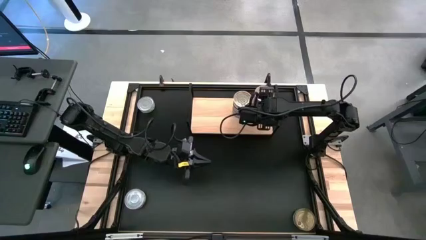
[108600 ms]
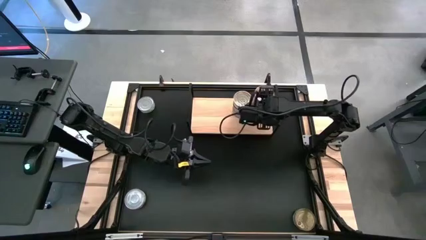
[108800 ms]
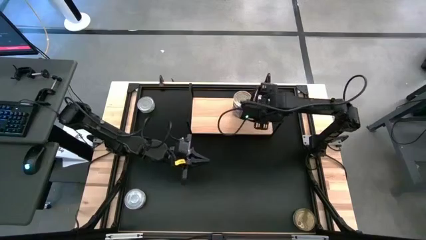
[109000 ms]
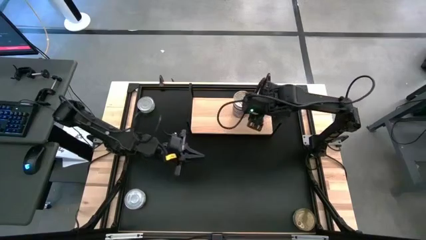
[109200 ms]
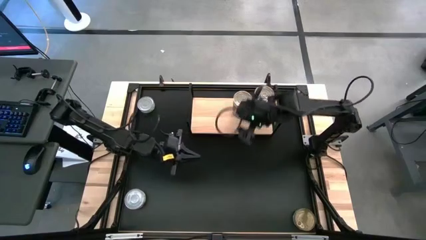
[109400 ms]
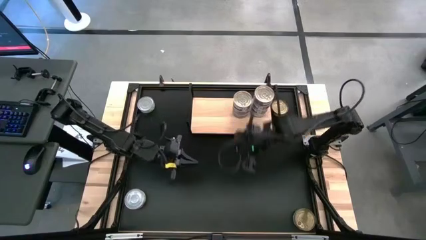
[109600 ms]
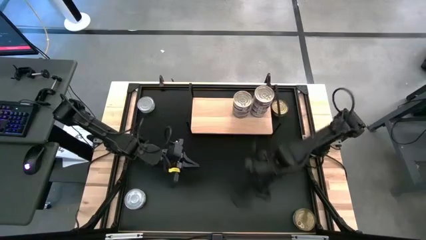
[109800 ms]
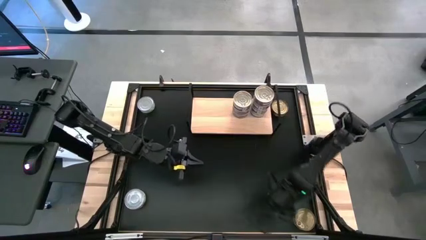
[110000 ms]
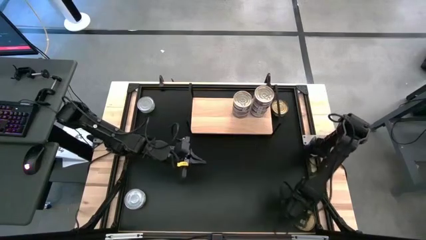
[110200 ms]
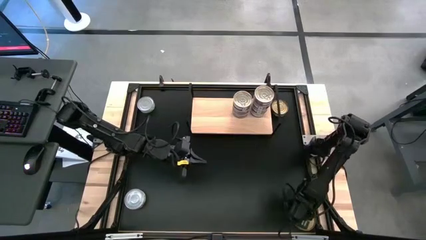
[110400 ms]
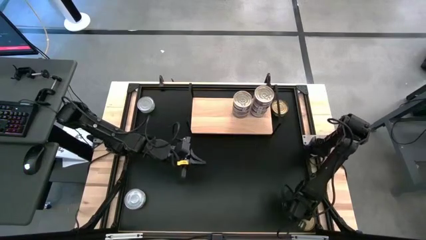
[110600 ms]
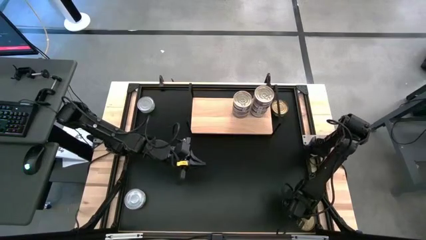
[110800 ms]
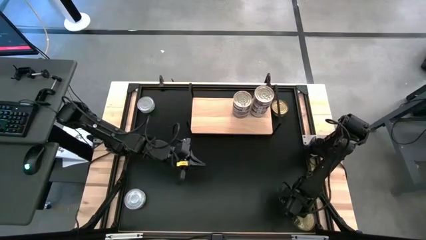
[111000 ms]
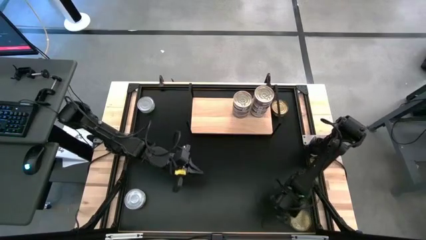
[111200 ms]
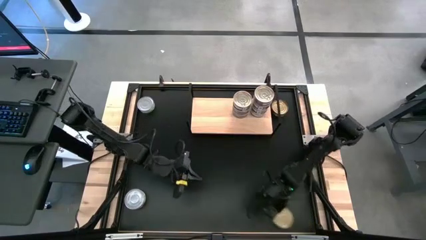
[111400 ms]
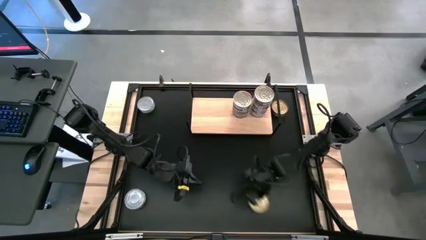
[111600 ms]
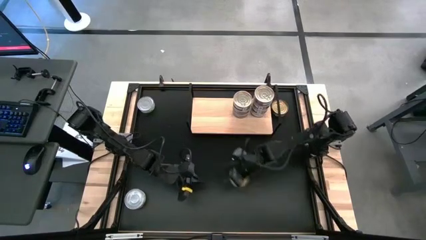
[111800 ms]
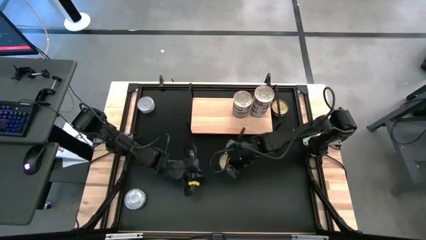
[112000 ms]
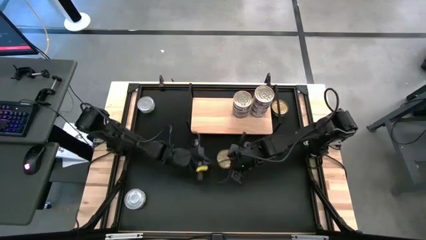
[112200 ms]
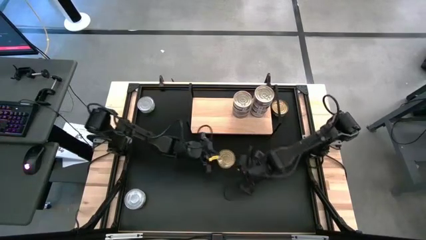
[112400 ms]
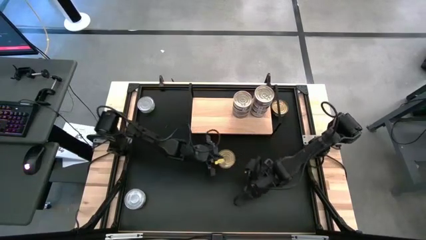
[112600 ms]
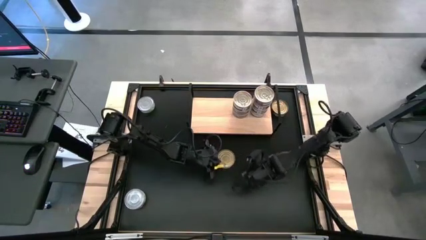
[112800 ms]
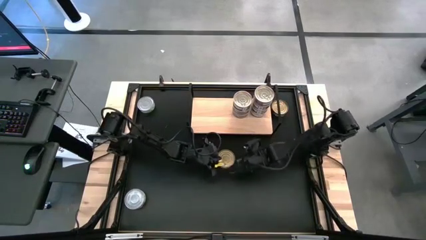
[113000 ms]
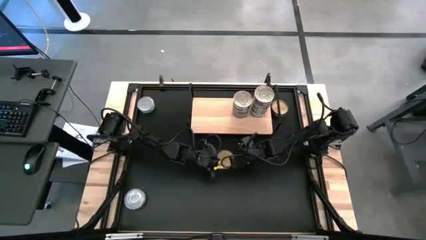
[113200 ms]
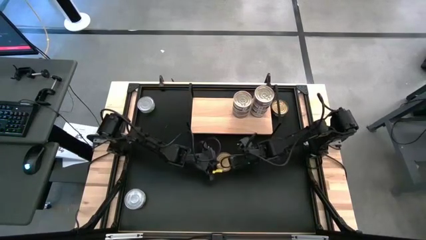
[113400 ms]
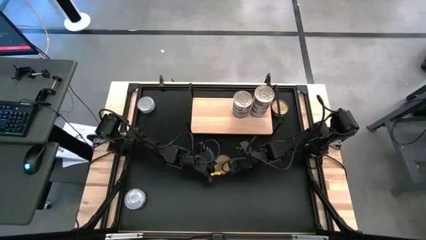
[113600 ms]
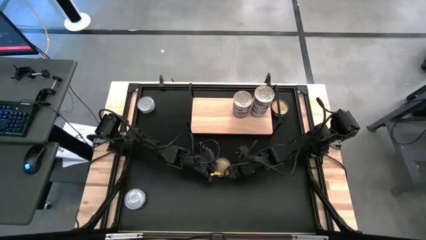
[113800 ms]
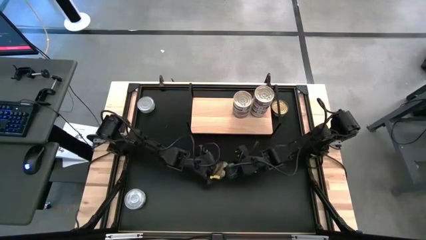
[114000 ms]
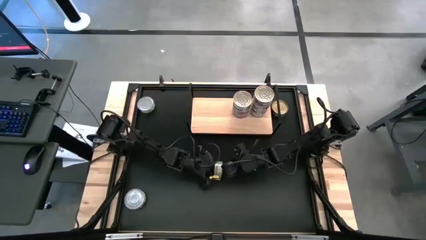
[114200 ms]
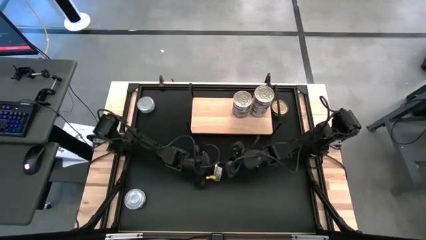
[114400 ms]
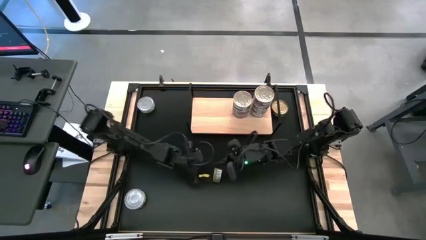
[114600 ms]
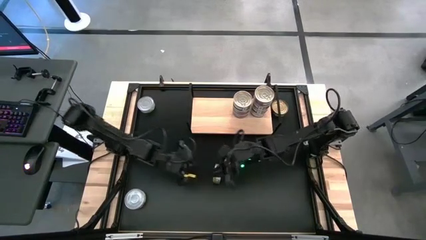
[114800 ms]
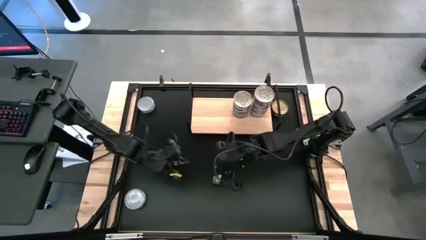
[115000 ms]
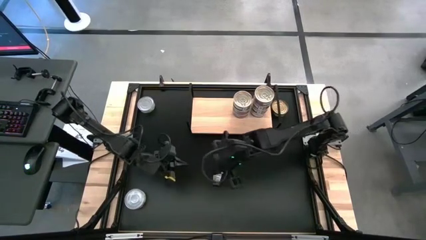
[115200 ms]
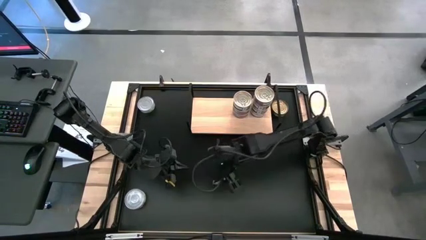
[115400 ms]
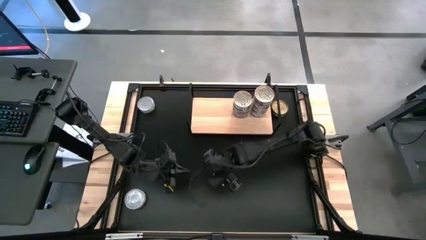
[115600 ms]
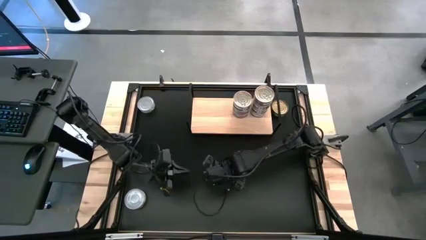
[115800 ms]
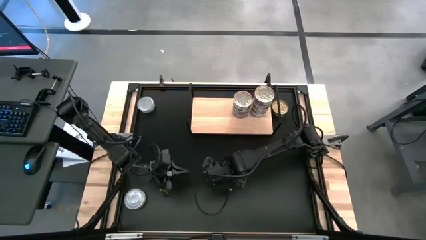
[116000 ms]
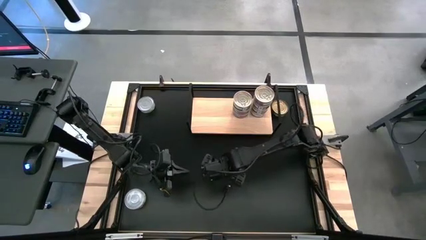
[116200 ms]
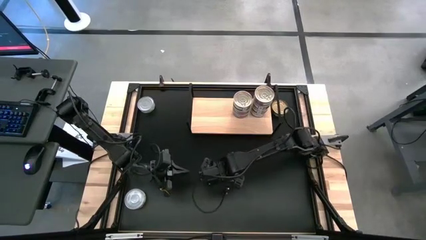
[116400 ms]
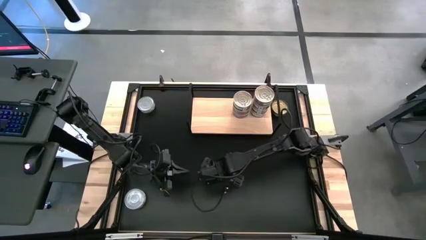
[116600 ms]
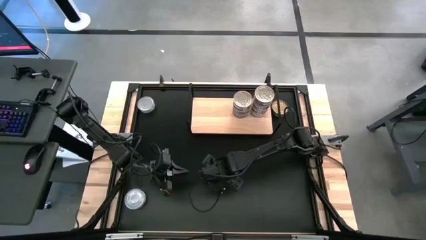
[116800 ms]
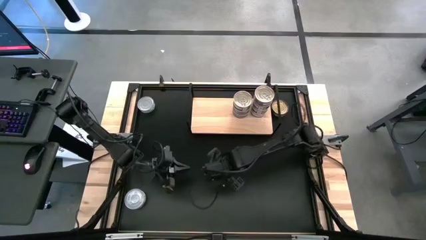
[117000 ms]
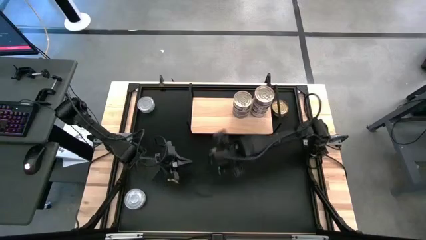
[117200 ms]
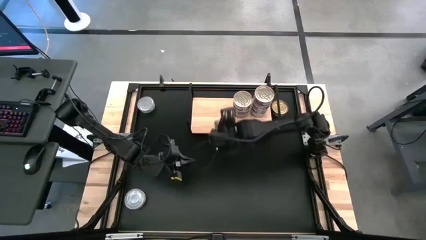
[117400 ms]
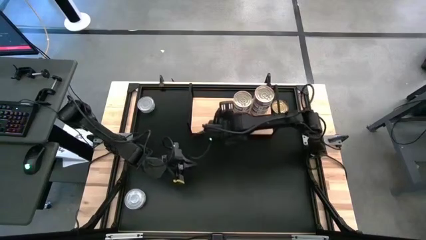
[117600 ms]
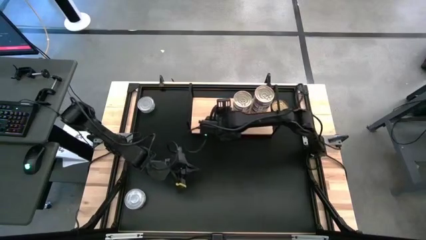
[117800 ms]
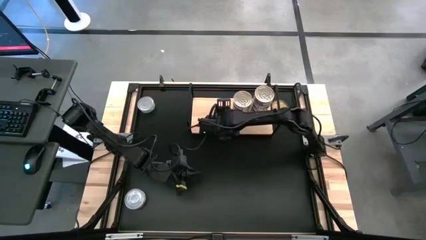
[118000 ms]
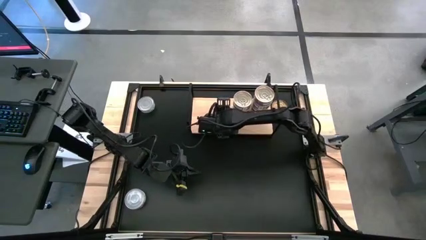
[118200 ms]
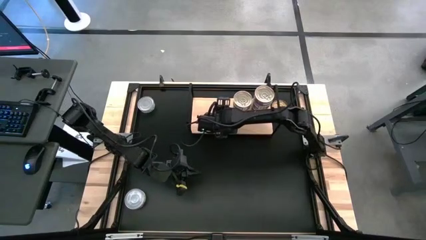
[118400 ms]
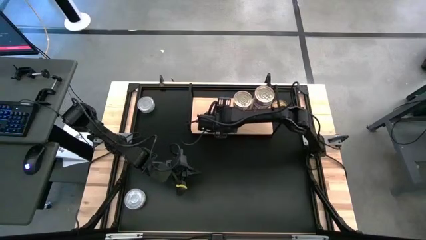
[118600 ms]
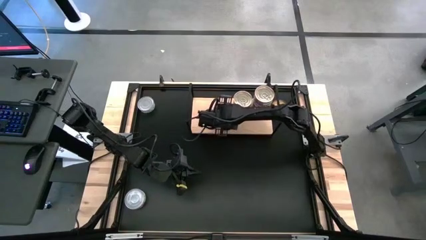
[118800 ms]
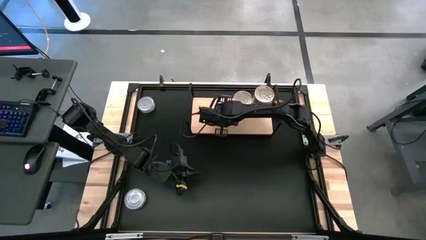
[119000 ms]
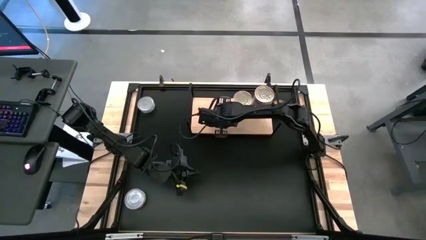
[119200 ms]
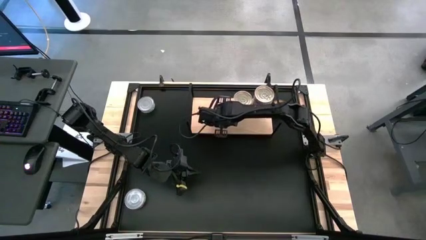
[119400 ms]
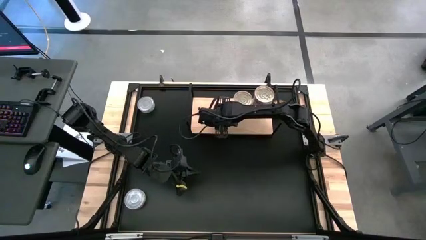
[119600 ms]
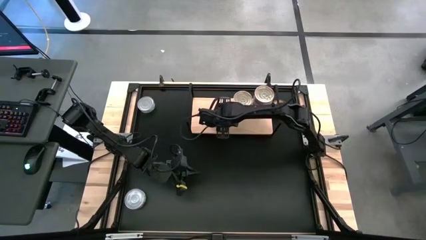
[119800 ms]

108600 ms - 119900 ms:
Task: Stack canned seafood by type on shelf
Put the green tuna can on the shelf

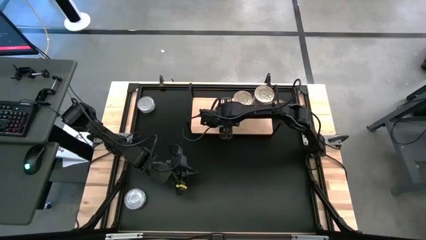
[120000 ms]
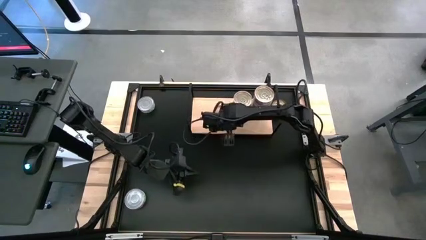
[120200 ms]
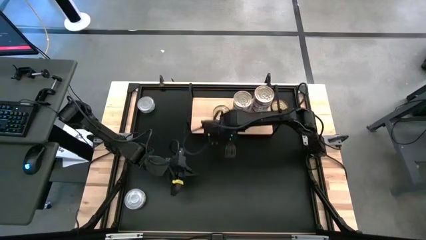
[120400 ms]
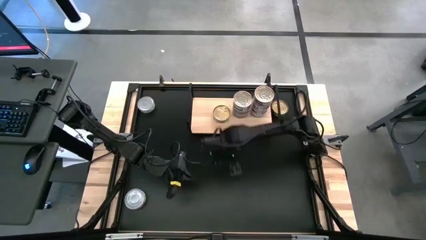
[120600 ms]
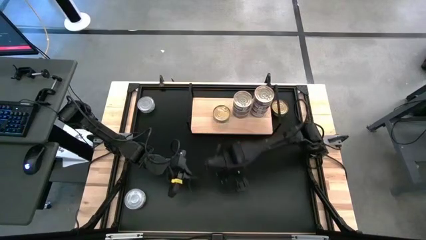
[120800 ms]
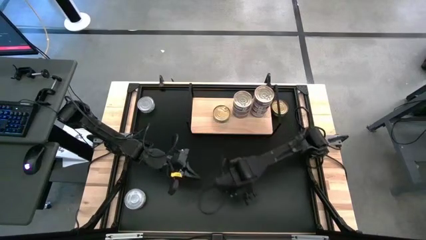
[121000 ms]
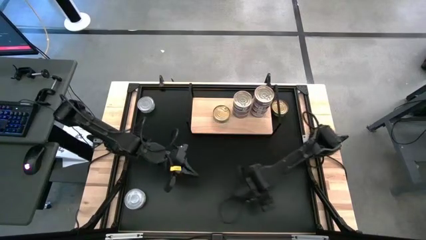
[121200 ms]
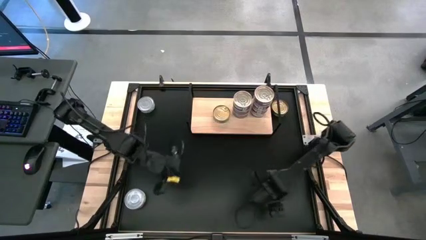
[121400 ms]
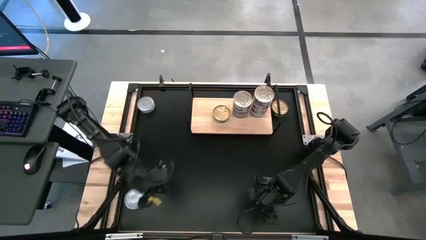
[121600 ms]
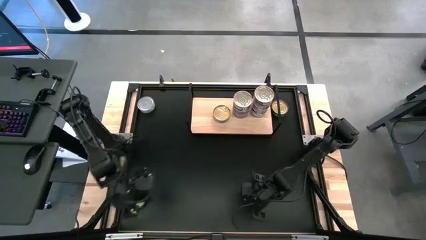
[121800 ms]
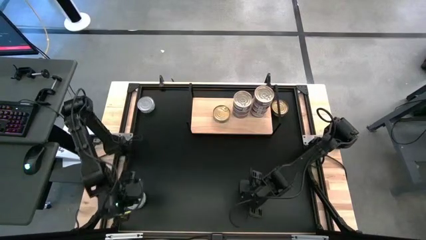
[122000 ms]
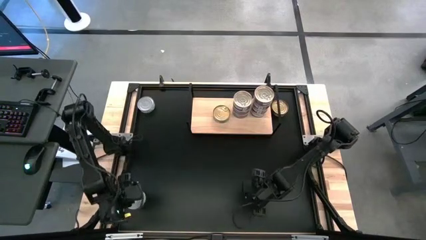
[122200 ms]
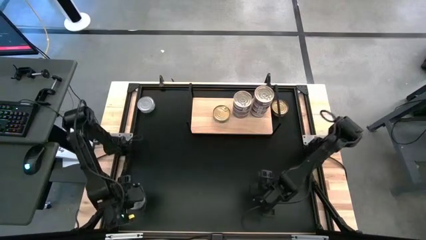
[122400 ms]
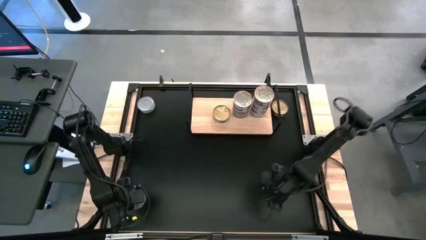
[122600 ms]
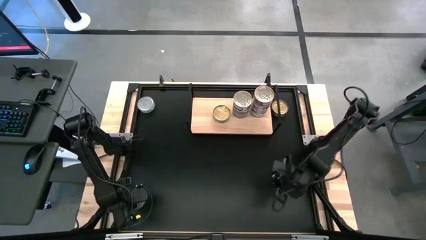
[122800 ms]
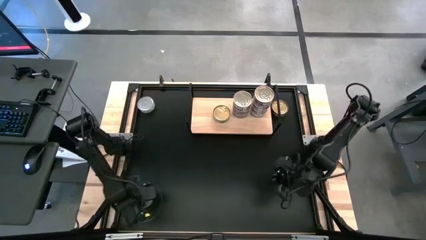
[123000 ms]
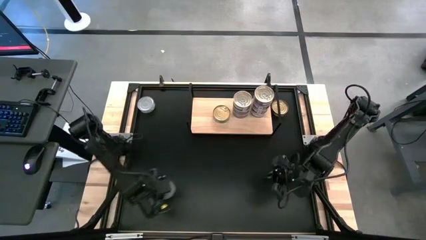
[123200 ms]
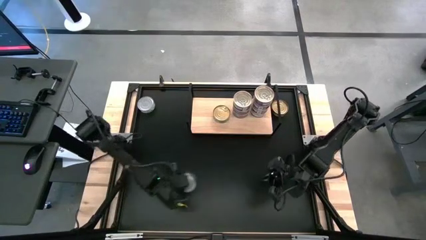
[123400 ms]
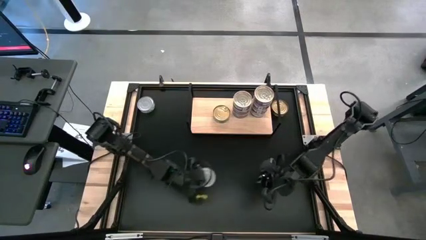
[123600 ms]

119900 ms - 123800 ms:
Move the green tuna can to the center of the table

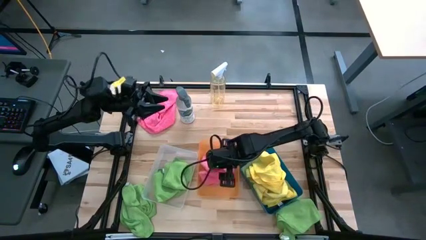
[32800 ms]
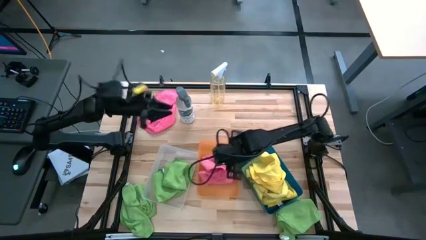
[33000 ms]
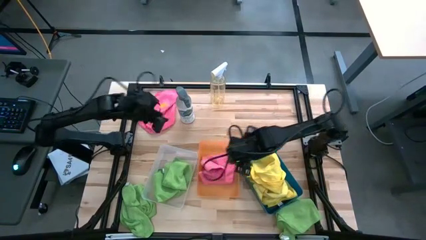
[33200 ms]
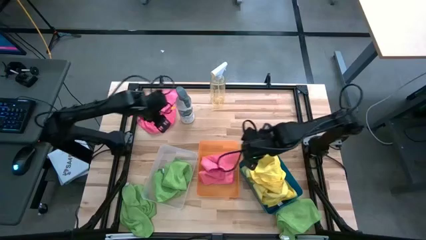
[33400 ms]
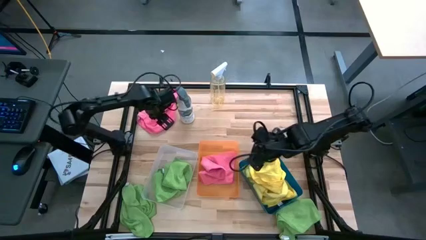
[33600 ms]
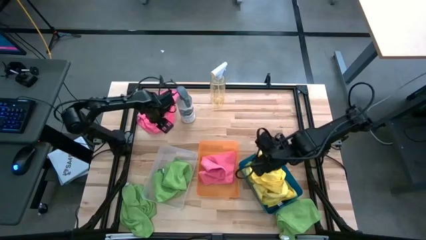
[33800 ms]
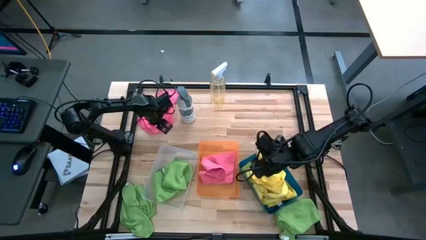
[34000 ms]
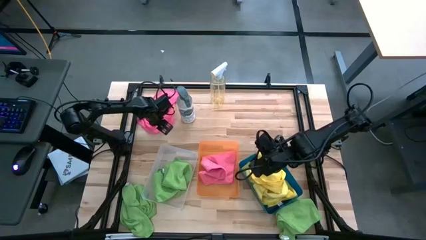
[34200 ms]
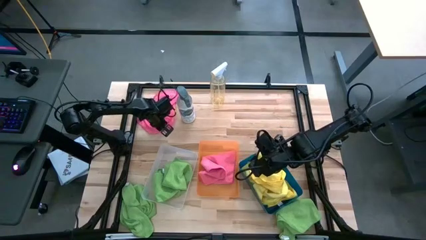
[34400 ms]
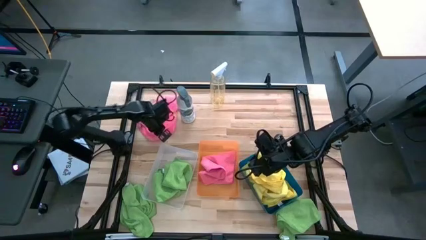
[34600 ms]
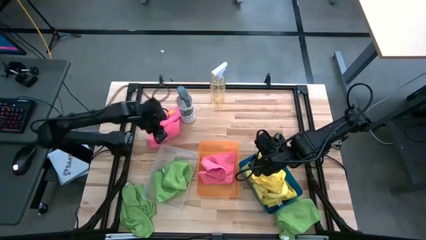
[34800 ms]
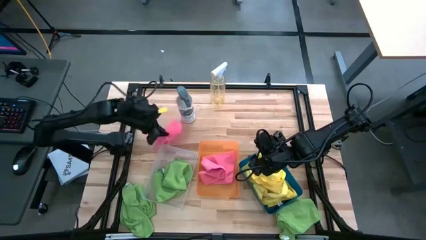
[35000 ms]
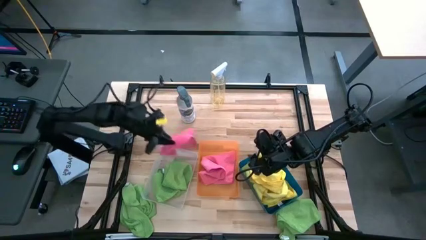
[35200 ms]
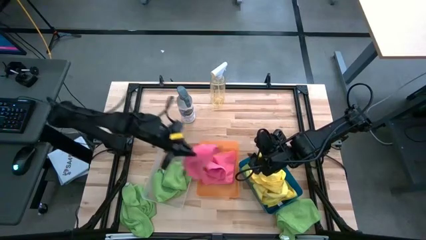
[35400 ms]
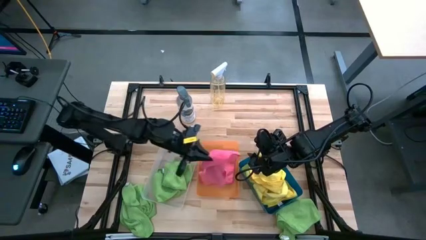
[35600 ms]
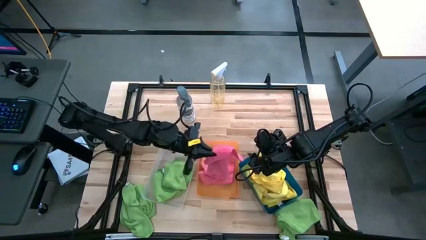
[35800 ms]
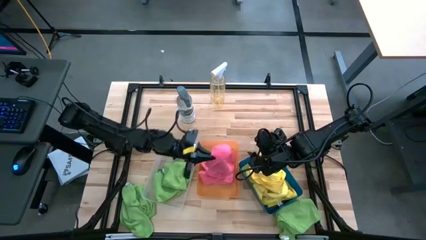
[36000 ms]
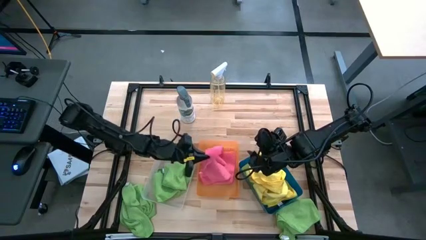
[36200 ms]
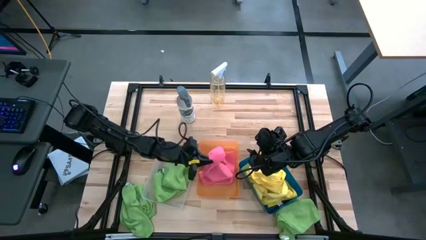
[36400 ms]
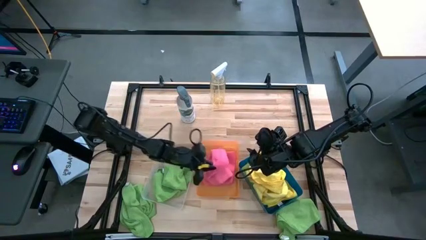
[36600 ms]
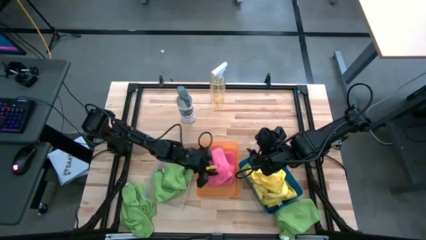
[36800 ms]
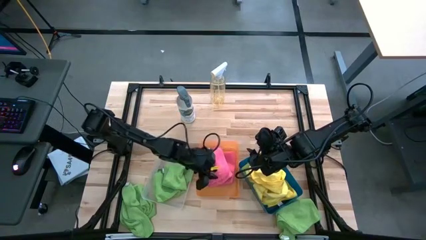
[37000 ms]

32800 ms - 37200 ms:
Task: Sort microfiber towel by color & place in baskets
Put the pink microfiber cloth into the orange bin
